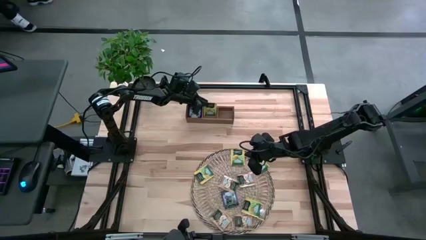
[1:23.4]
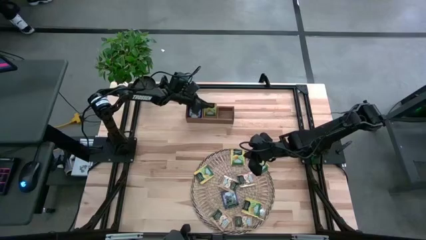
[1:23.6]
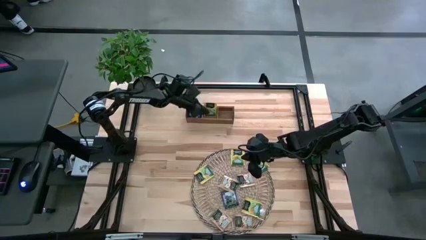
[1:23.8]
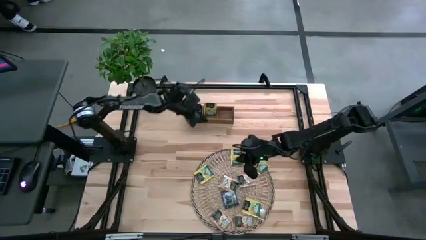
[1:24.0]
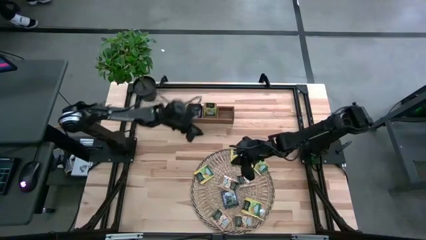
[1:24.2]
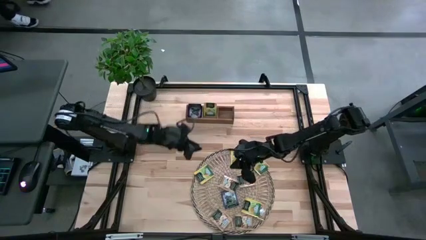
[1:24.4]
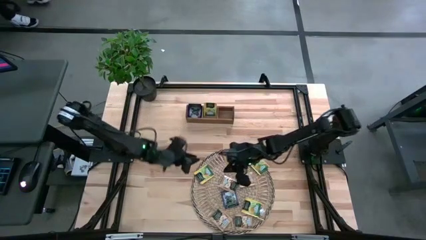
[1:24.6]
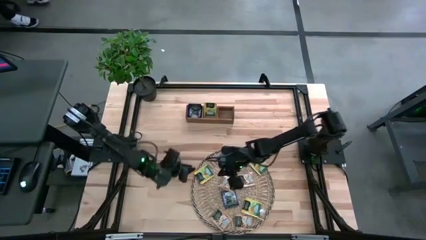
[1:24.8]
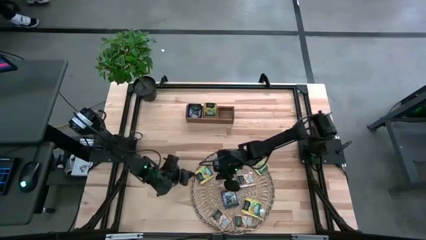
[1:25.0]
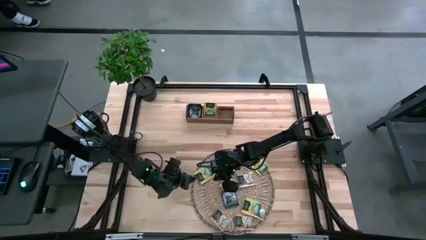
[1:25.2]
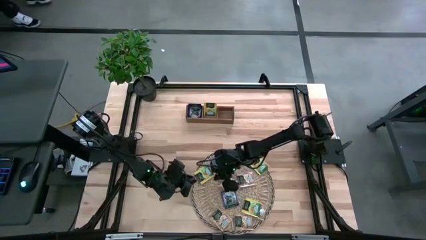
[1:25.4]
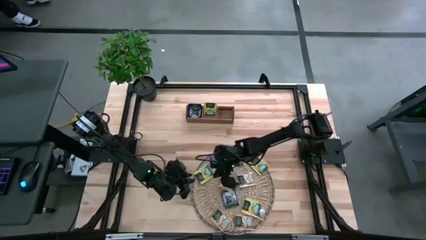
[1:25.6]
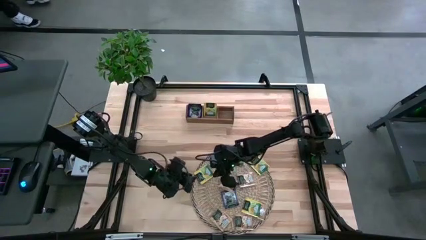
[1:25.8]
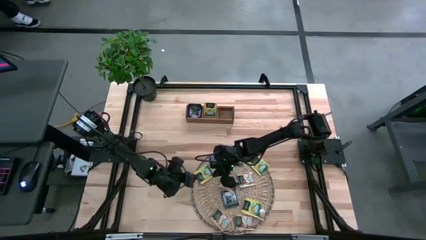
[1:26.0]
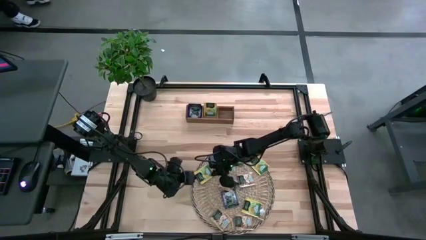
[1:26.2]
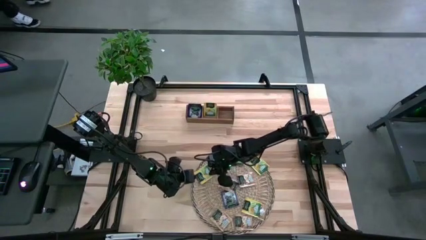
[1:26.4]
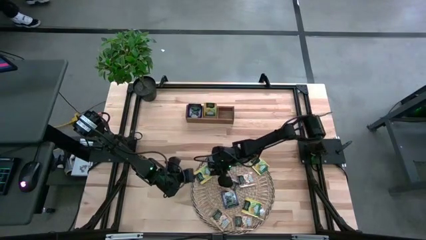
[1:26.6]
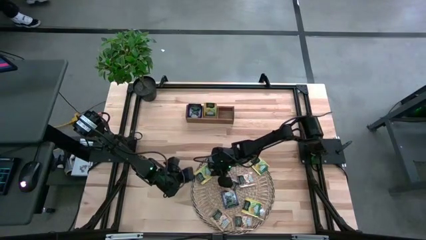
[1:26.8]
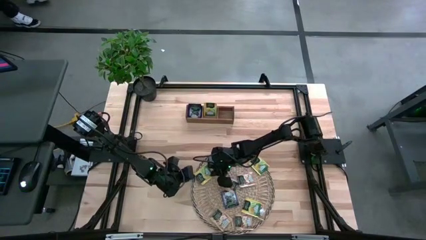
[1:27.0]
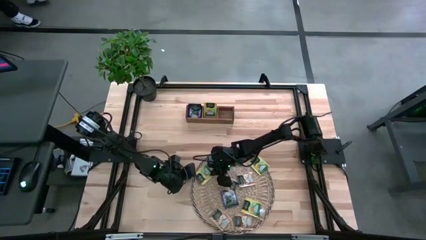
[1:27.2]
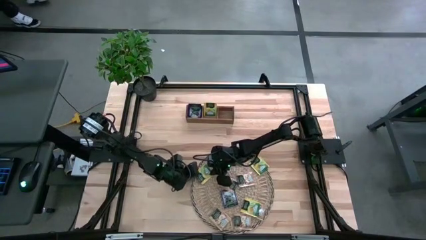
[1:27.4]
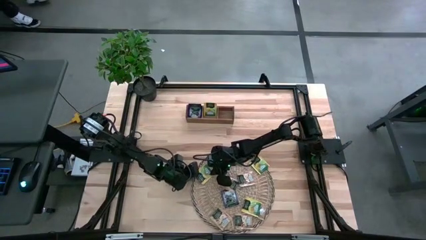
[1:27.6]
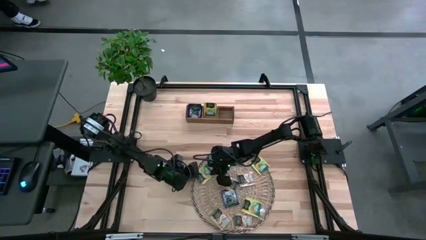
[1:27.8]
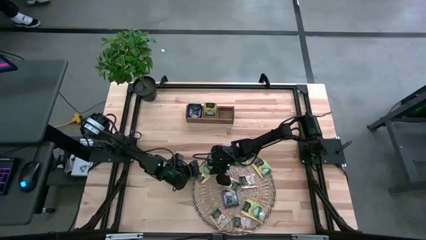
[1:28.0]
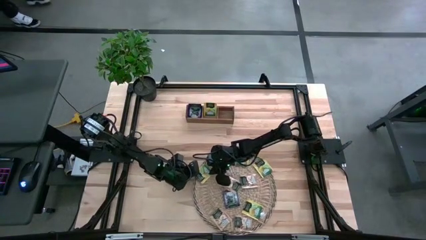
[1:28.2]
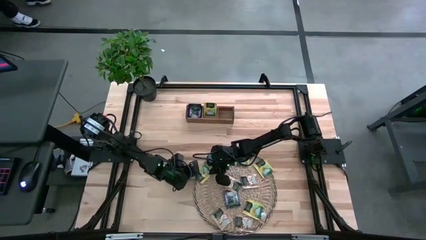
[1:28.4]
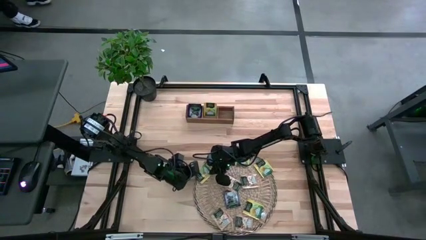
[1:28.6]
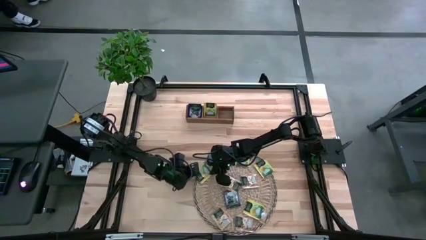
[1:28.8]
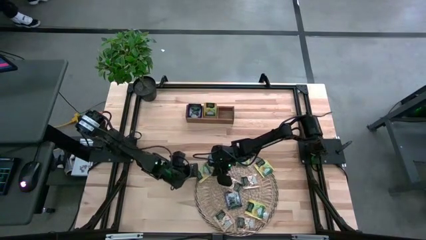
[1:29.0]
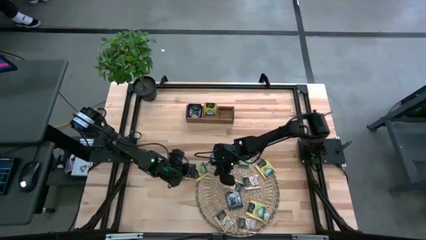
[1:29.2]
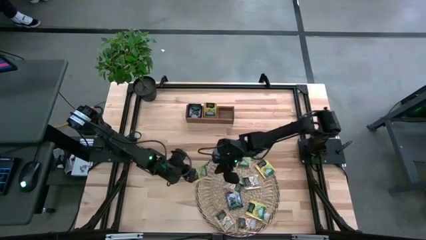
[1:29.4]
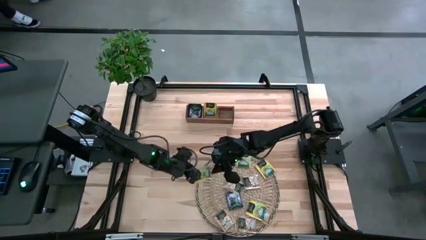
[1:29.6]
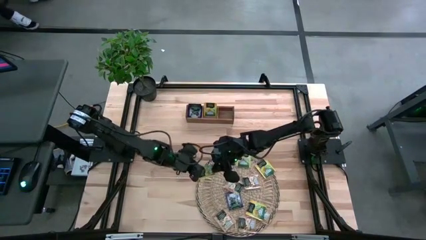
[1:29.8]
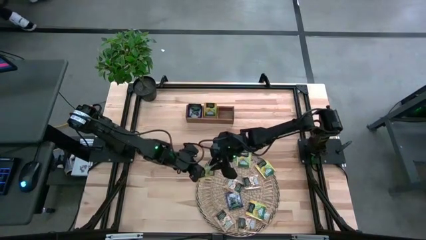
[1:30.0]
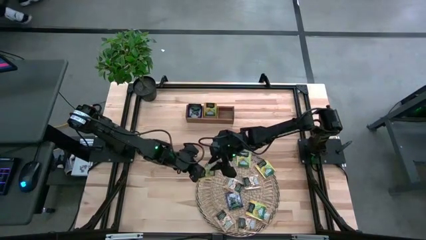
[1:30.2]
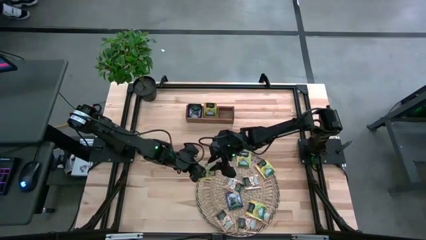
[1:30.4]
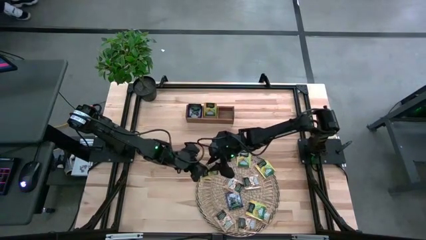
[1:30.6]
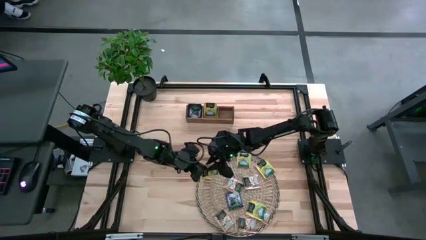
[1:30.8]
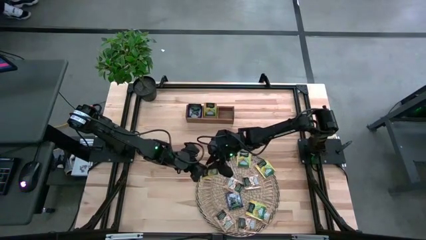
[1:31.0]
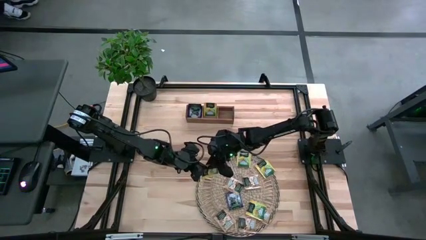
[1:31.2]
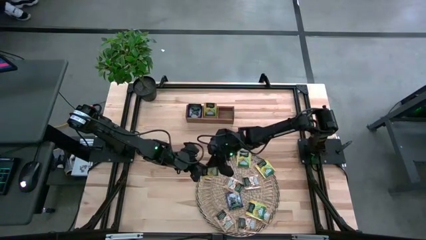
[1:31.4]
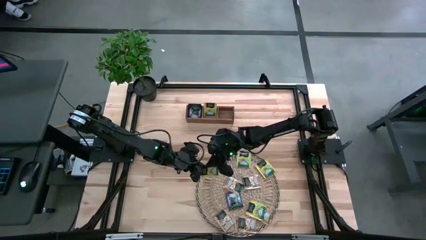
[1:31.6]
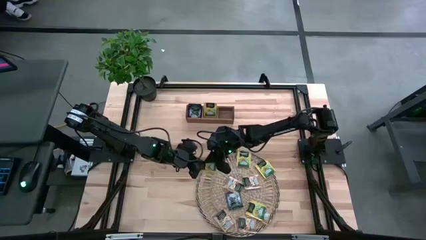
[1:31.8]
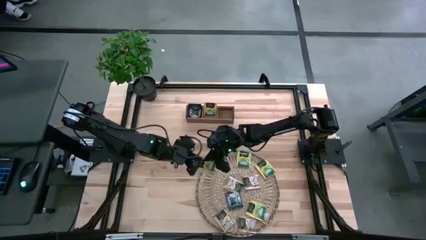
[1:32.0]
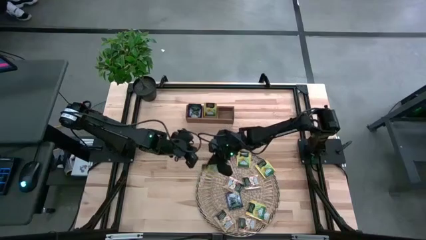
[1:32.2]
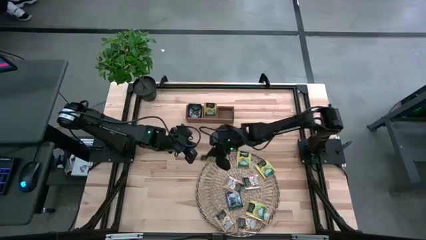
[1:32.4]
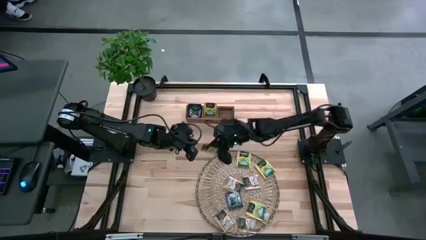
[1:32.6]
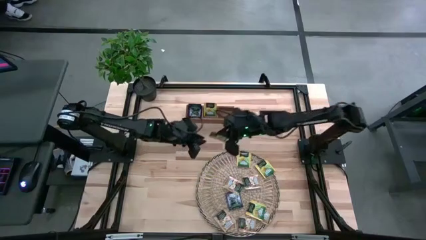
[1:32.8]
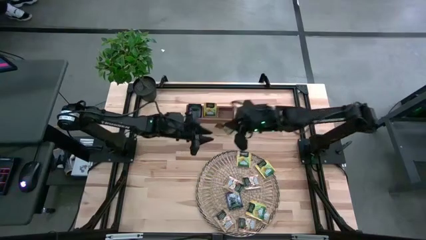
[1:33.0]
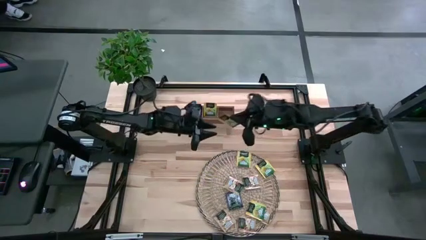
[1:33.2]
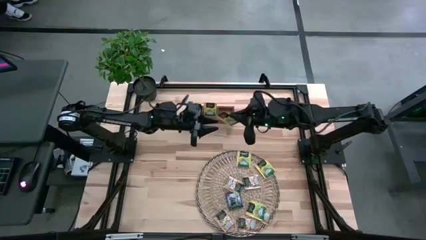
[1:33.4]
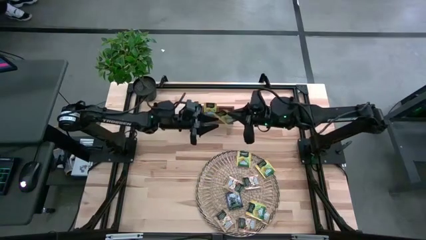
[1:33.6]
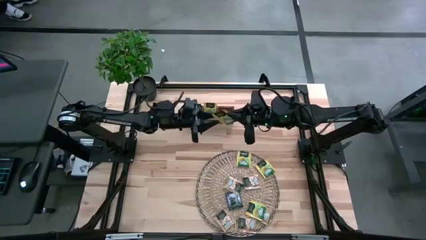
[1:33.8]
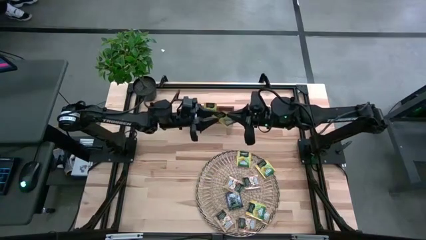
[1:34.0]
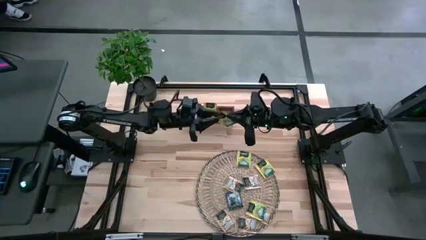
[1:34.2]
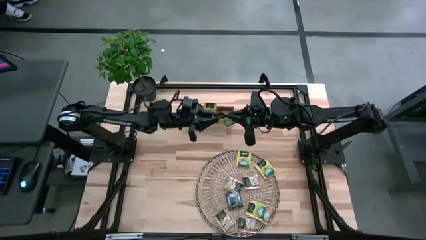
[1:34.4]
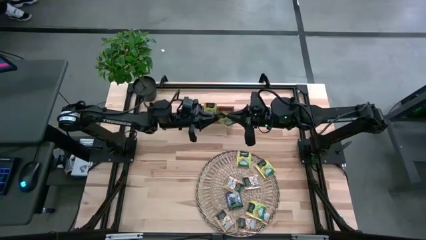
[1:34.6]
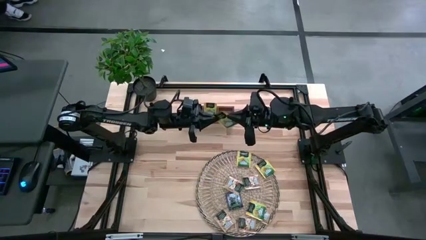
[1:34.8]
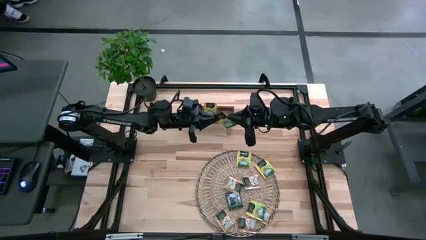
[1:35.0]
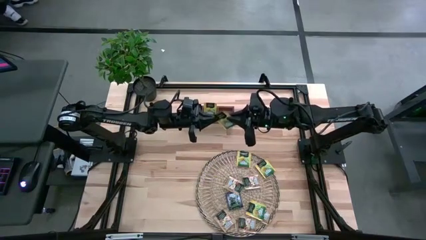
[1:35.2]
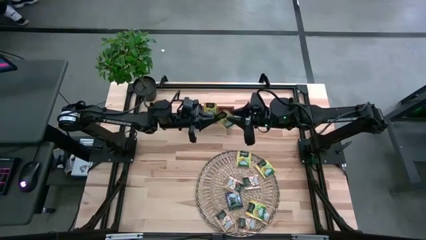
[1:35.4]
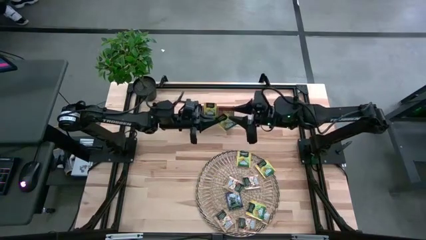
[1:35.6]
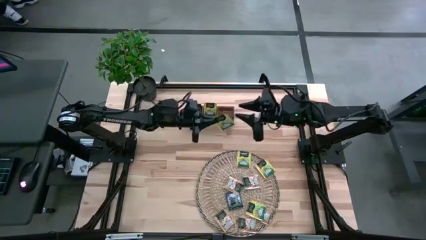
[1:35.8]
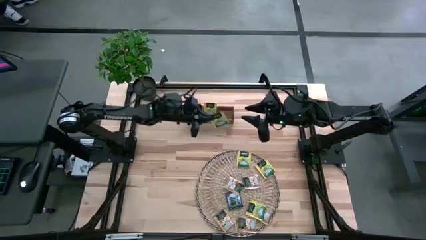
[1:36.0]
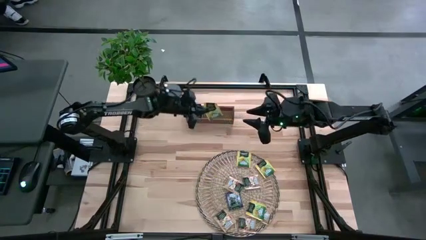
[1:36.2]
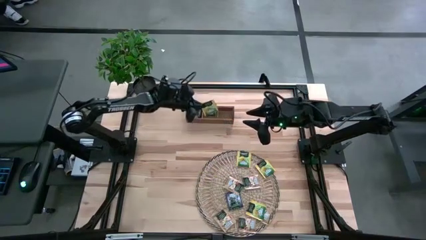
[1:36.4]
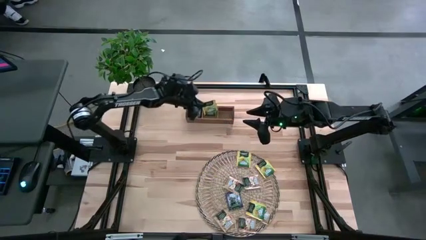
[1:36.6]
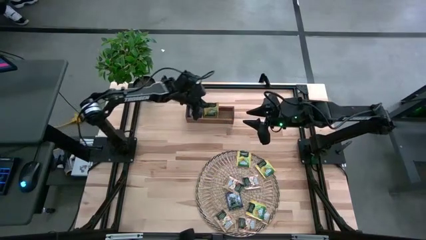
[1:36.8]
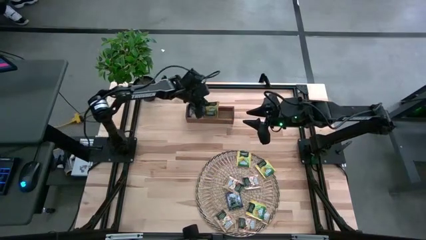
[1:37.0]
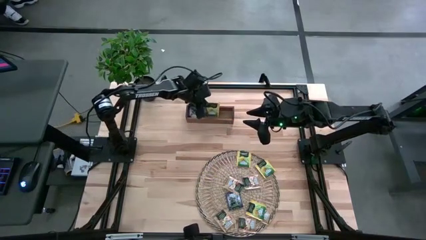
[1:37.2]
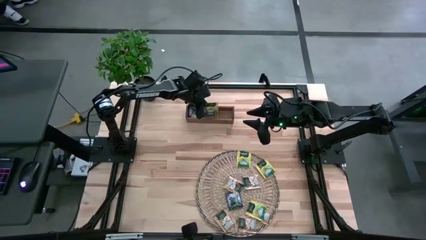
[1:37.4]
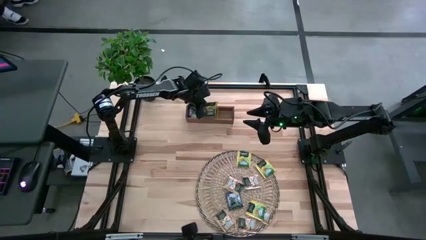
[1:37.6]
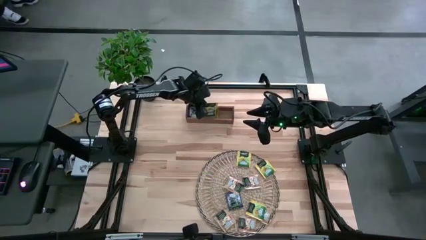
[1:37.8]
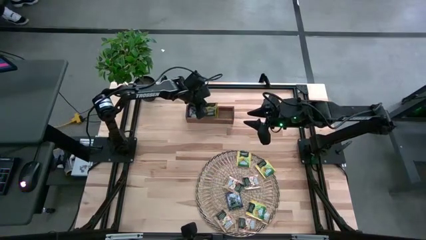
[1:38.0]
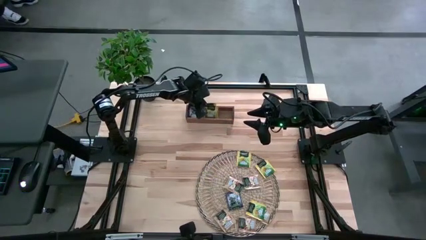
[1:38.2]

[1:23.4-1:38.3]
Task: Pick & Place Tea
Put the yellow tea bag in the middle section of the wooden organizer

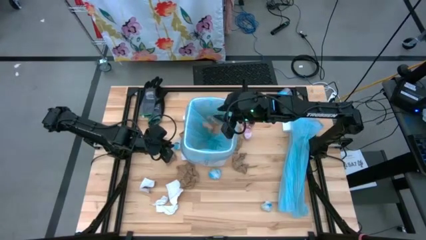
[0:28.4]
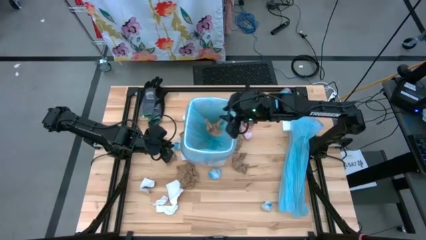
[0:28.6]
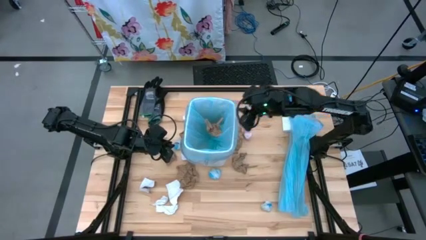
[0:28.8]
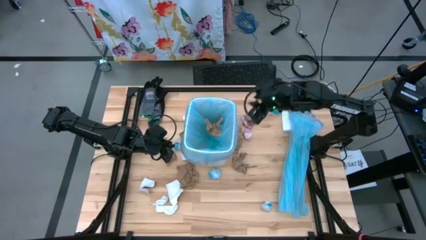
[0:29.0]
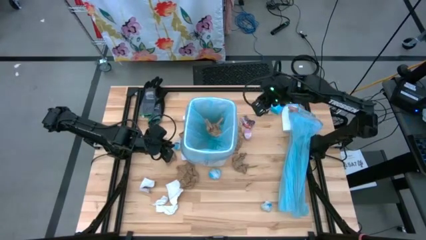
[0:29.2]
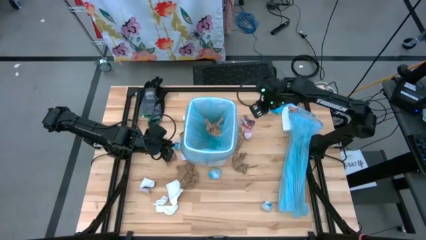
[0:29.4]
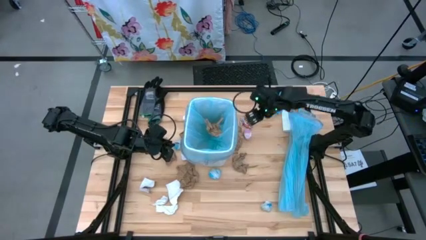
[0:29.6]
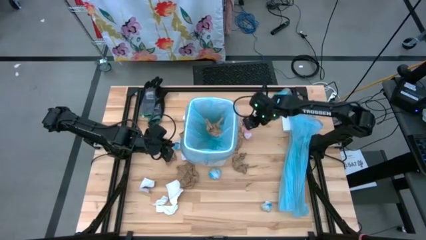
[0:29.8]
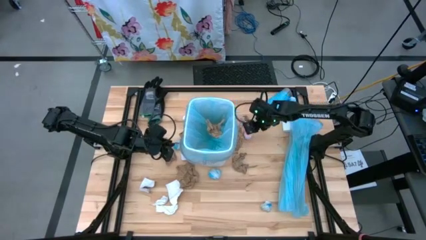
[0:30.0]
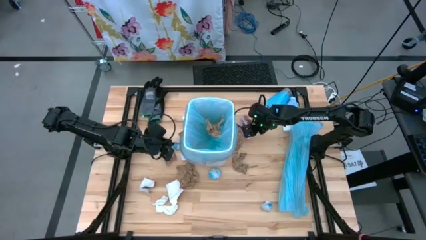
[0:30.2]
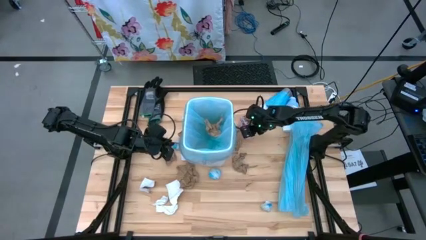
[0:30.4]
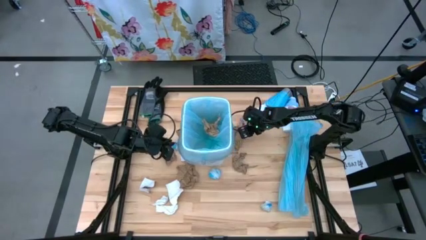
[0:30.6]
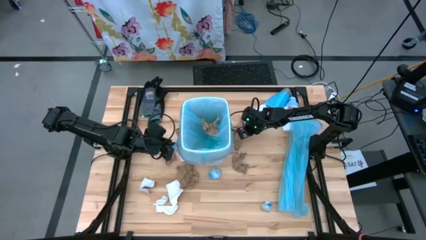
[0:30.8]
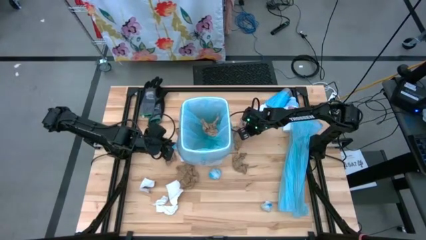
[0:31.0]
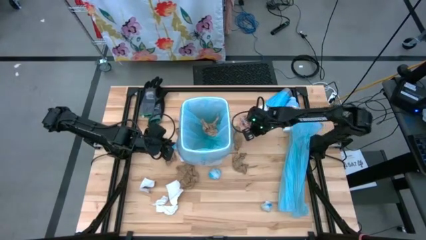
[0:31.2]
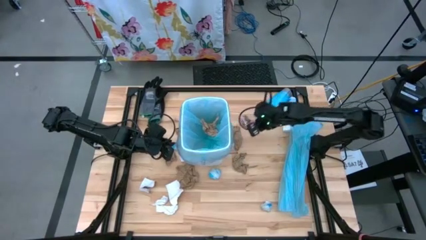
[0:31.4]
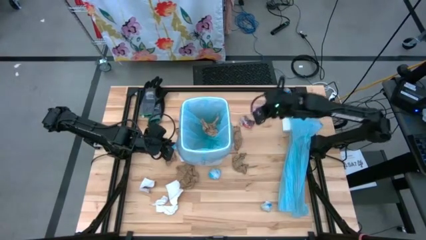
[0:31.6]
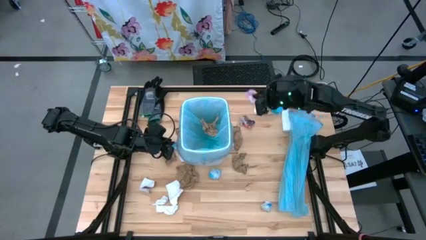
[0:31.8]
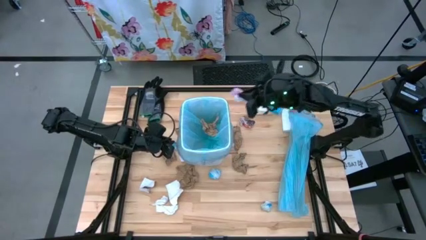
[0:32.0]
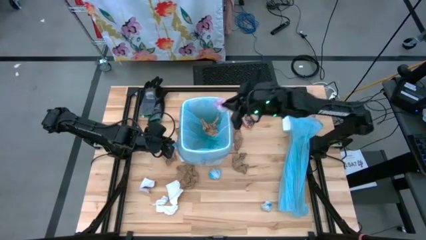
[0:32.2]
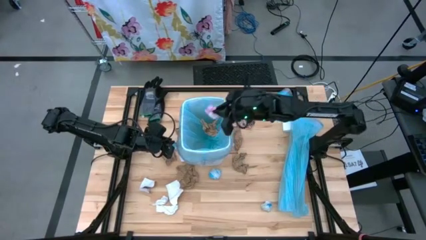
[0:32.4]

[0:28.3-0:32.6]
Task: place trash/remove bag and relplace
Put the pink plastic into the trash bin
